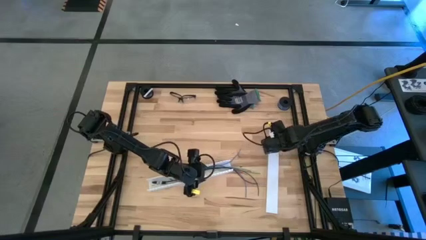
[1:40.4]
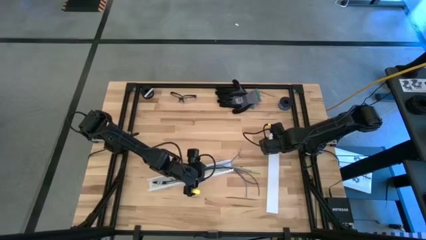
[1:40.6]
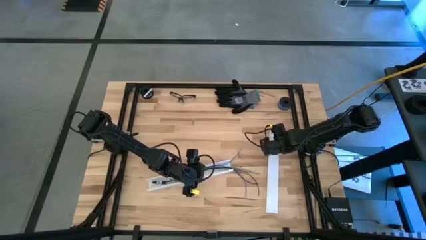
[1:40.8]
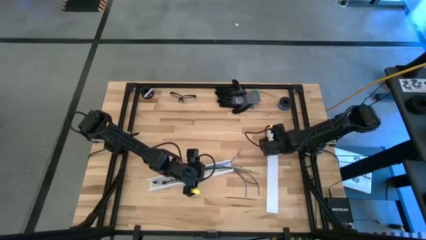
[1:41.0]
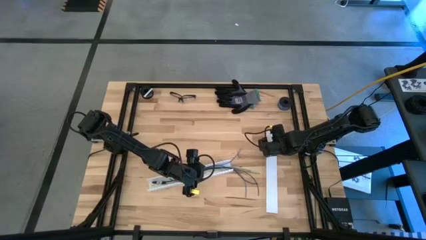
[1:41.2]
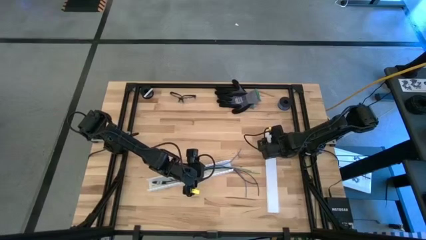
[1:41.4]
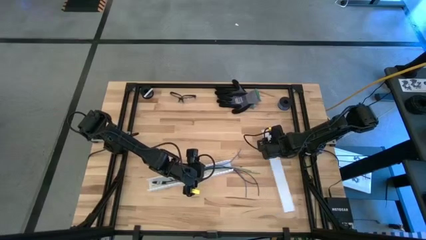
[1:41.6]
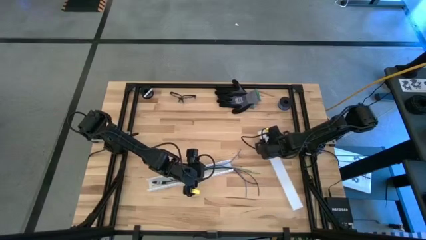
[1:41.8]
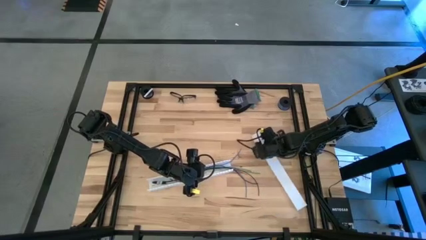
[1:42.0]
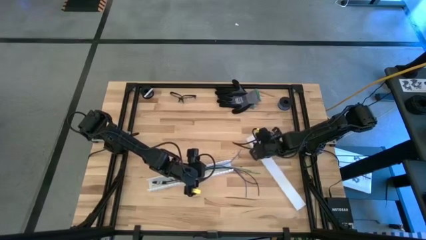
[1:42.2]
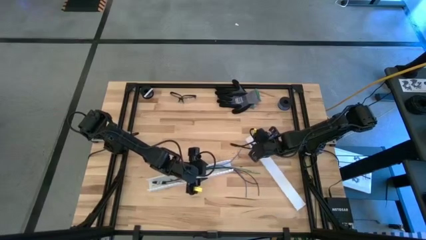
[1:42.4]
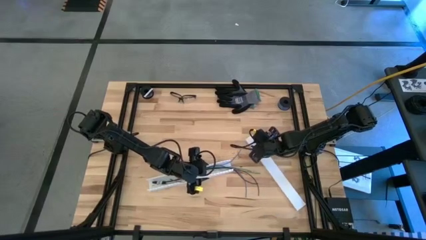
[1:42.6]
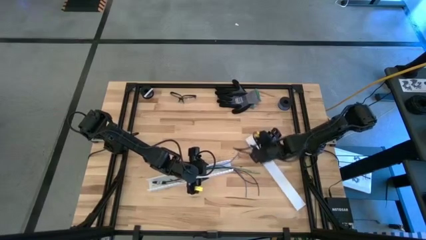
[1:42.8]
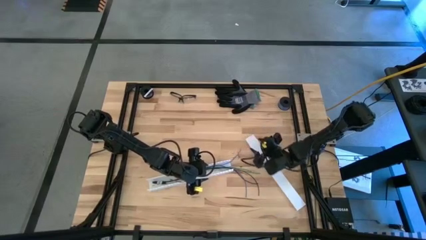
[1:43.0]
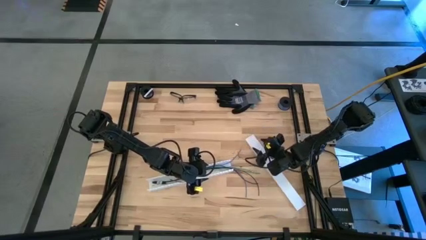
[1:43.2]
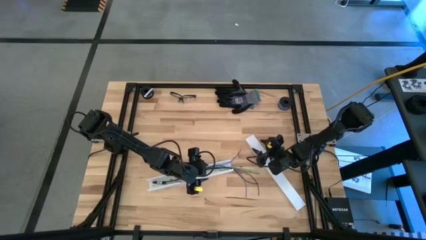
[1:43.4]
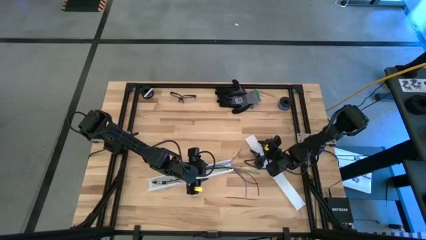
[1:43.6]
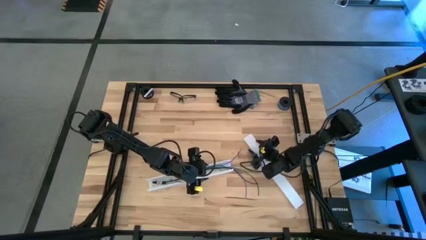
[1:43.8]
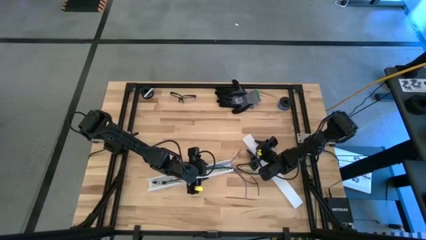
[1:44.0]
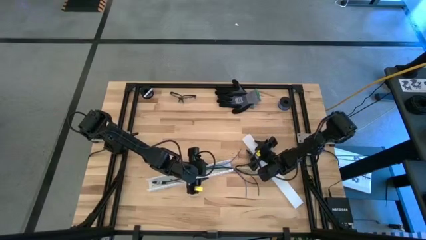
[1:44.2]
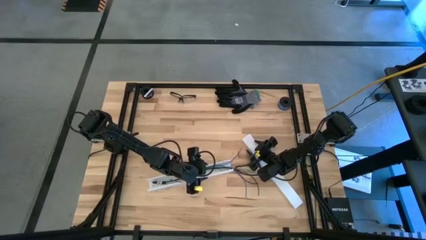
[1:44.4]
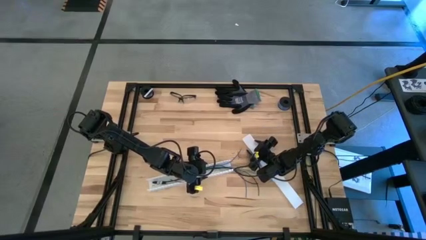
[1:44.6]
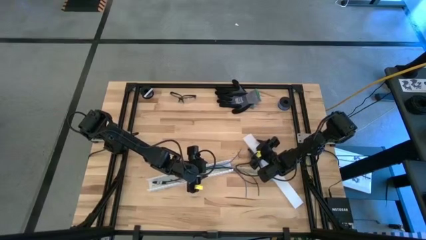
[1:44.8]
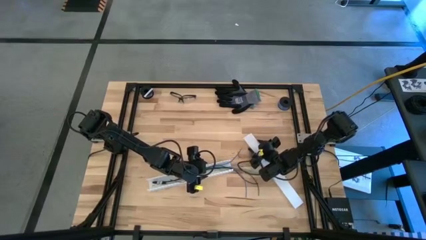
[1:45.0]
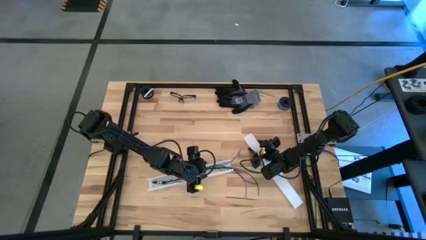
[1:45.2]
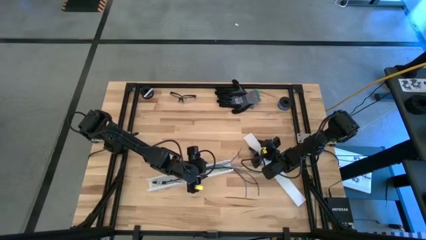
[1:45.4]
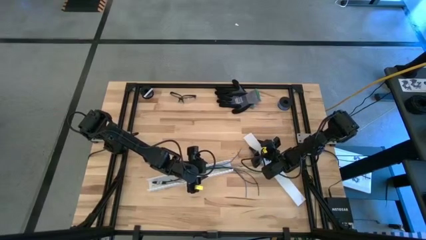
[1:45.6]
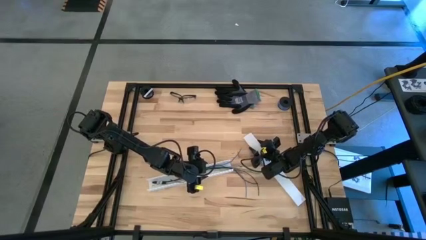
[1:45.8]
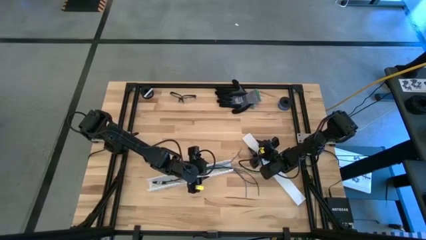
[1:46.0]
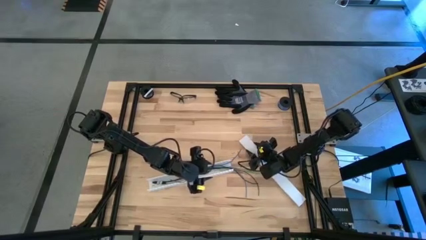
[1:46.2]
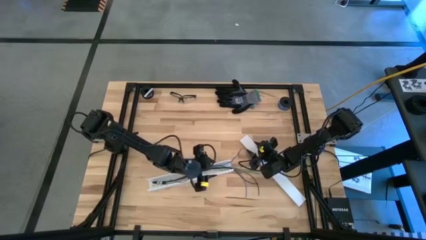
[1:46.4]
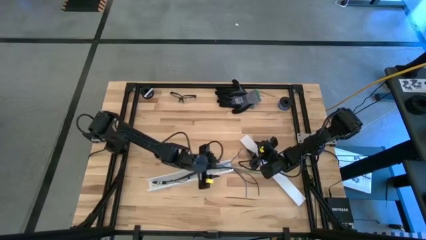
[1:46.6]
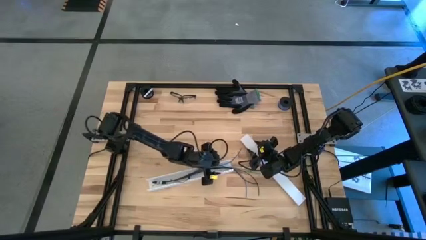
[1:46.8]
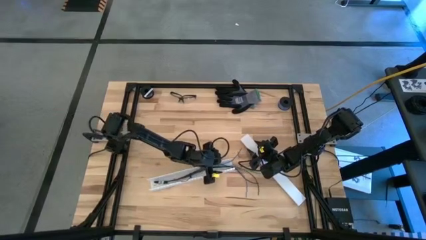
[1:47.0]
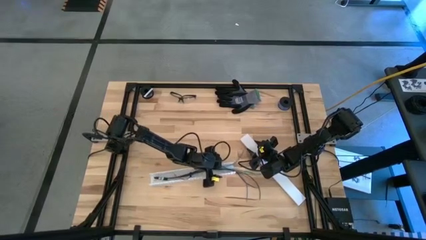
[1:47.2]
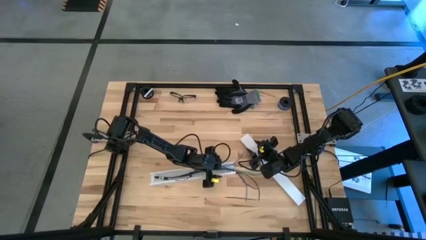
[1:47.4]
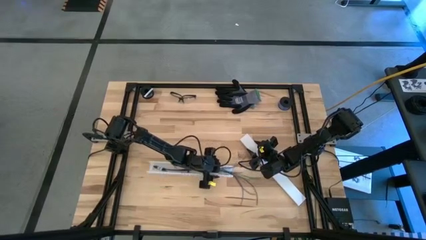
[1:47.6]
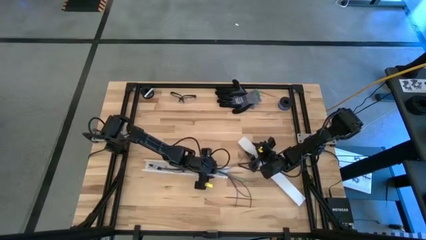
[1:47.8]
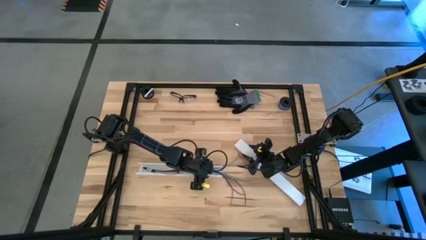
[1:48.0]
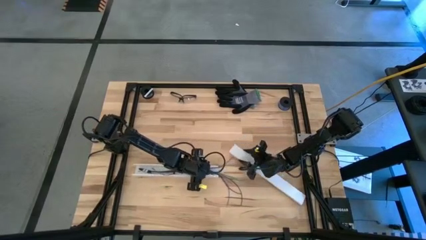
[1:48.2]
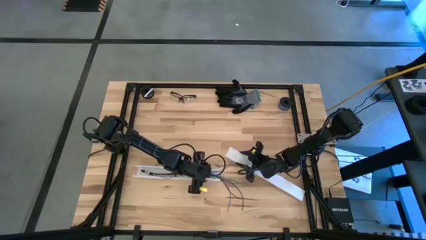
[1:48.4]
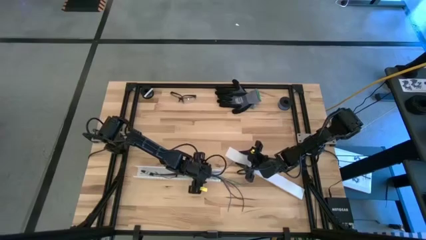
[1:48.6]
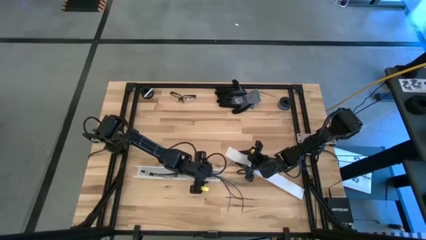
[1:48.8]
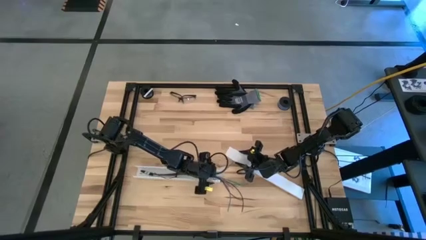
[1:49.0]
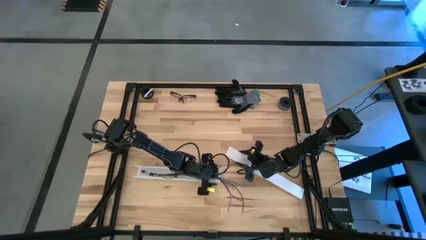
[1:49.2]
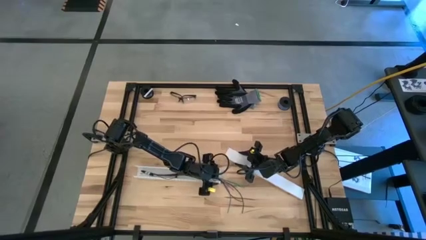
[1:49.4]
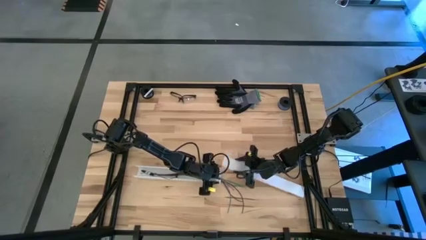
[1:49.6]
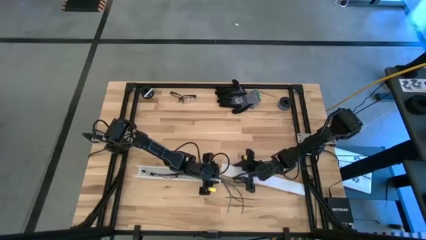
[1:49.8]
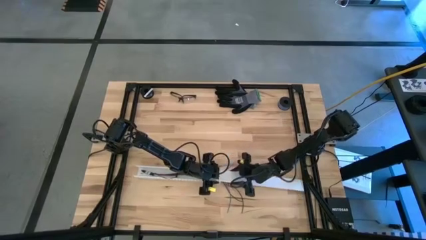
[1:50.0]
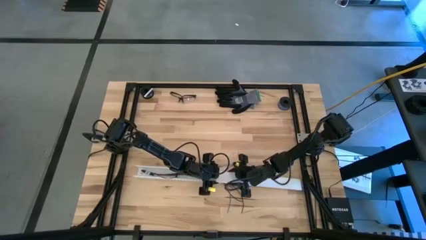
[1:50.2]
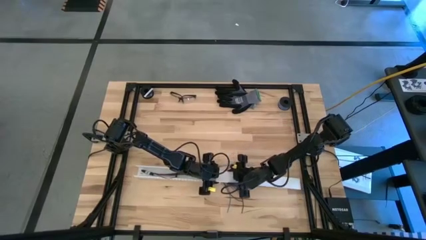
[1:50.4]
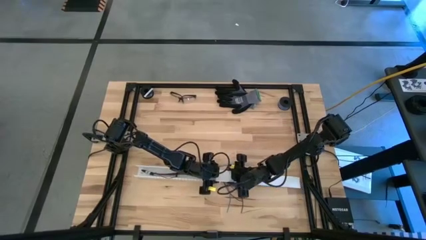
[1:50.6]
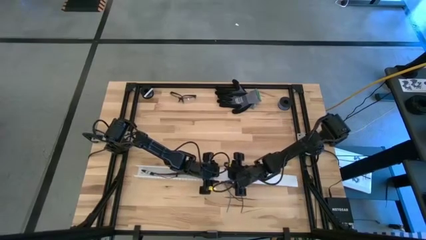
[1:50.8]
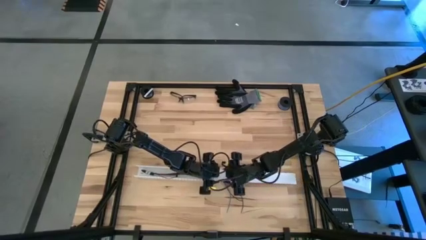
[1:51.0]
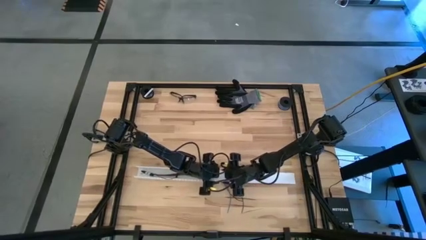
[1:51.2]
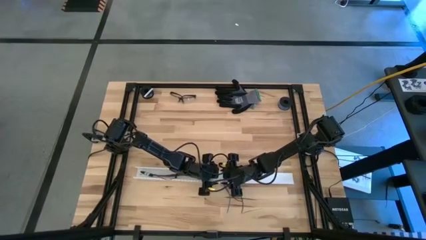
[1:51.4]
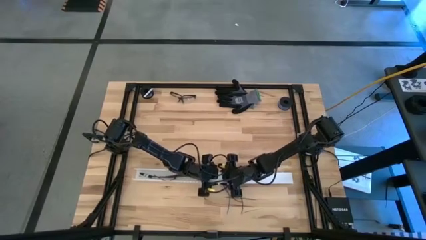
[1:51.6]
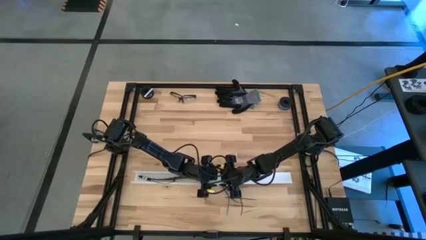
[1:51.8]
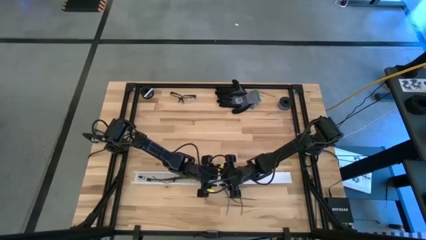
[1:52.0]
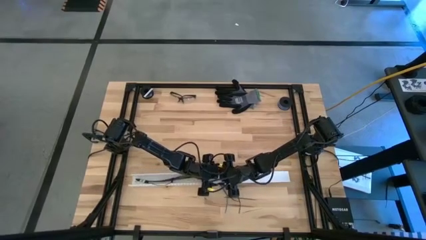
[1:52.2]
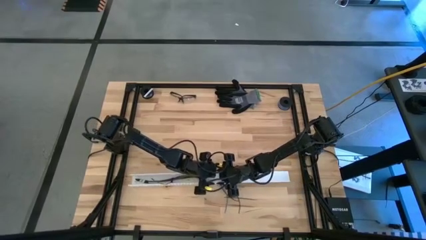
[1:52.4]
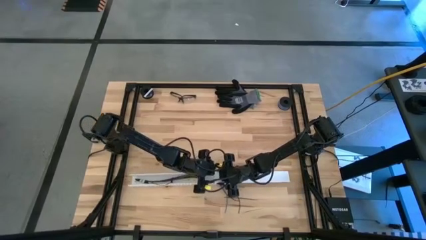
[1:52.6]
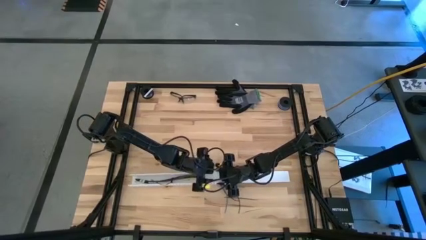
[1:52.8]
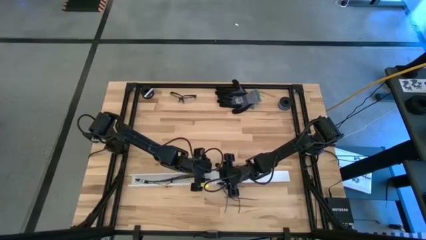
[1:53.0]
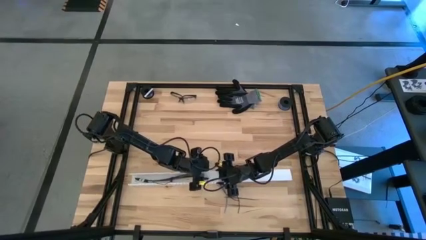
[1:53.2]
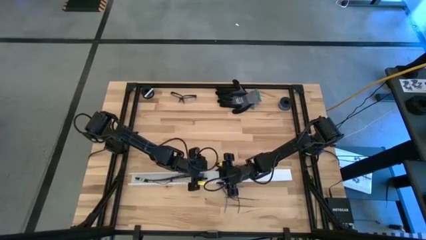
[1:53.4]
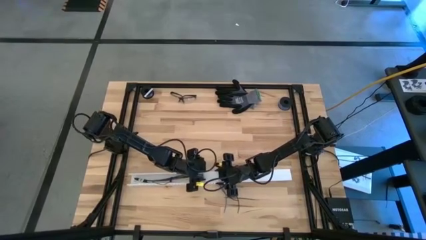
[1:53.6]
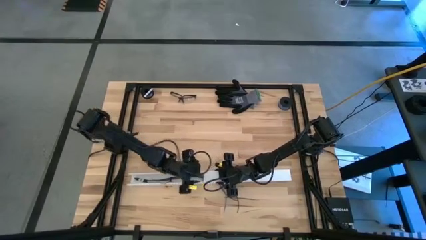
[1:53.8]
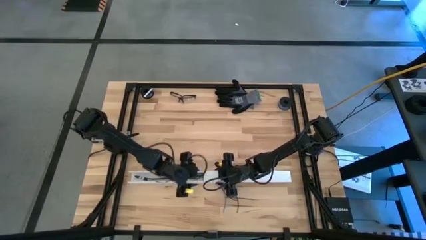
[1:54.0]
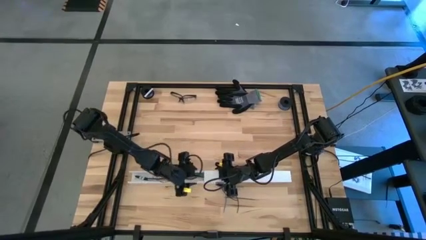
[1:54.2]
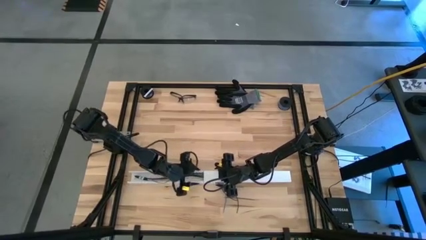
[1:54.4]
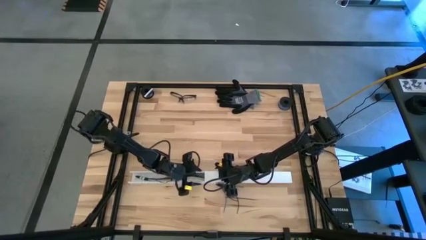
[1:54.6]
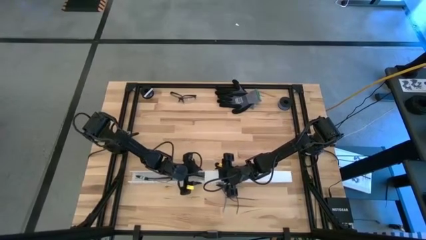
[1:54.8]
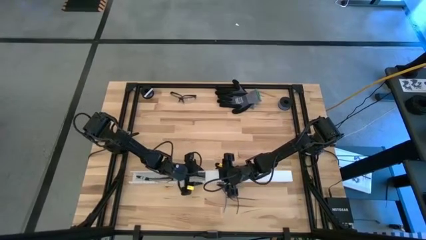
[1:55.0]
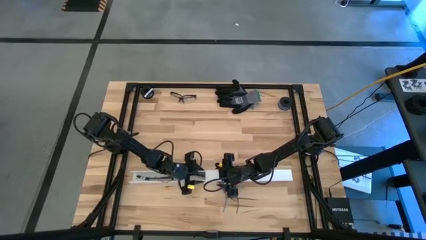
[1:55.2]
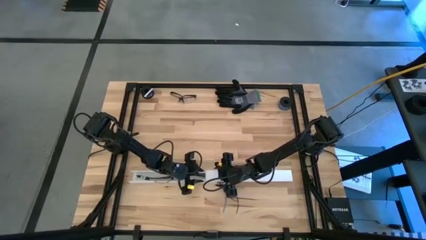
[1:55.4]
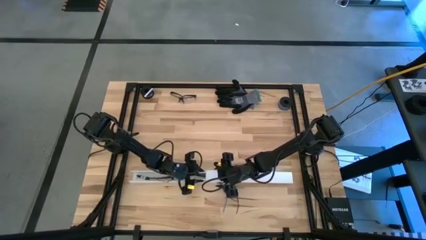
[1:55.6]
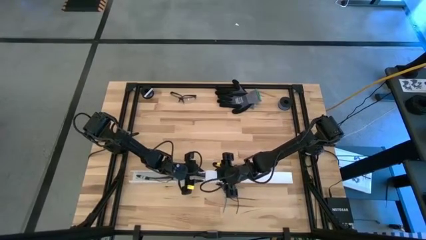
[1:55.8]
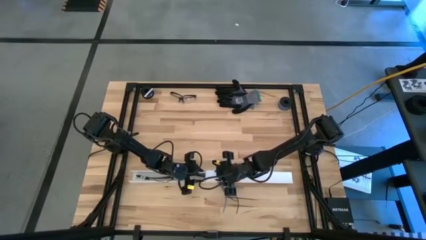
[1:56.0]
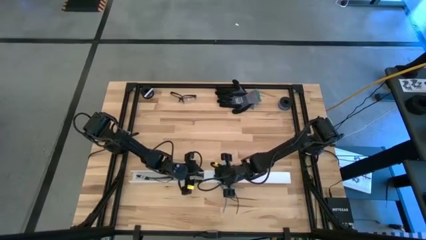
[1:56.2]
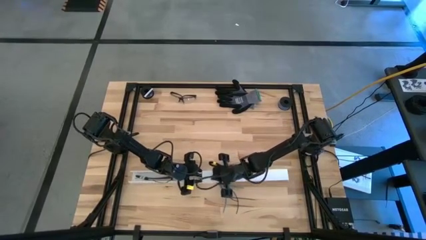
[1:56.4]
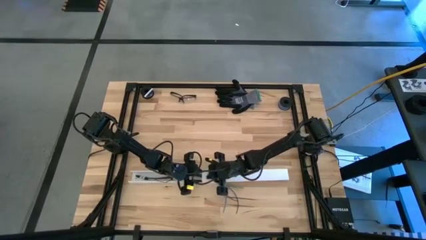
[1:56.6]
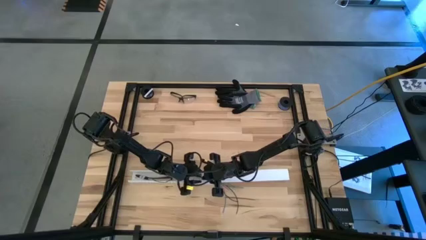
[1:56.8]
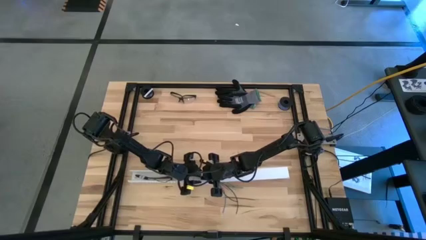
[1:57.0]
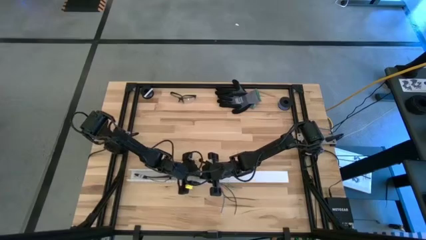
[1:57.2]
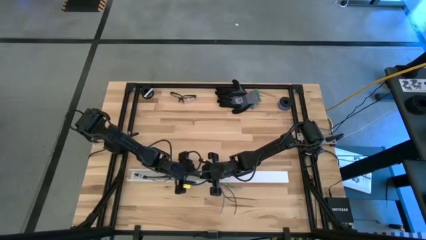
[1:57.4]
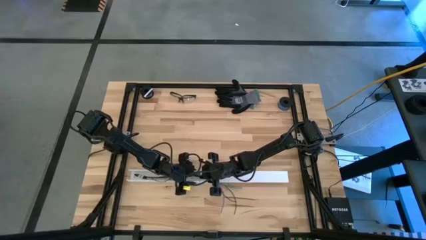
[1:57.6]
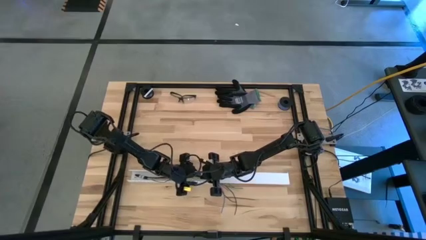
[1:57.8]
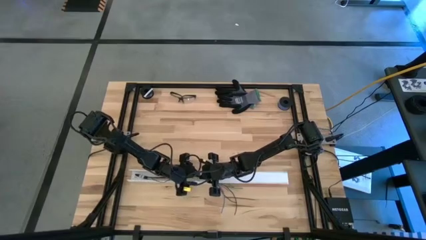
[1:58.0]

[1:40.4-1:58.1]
Task: Ziptie cables
Close the cable duct
